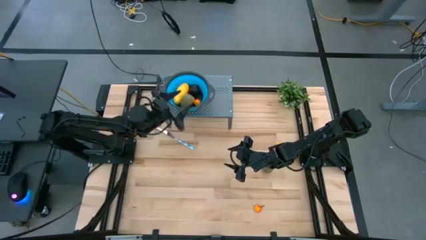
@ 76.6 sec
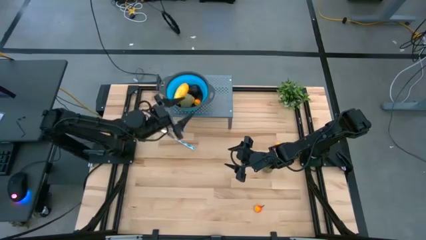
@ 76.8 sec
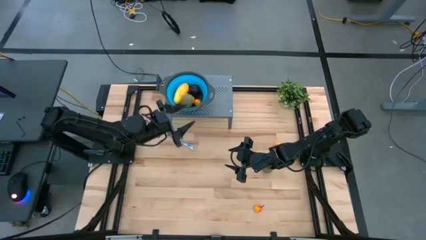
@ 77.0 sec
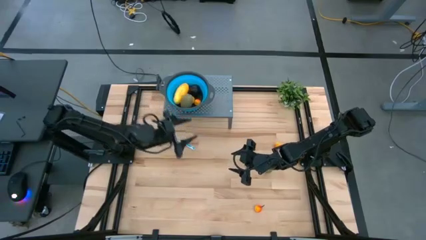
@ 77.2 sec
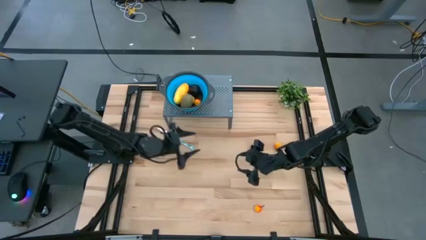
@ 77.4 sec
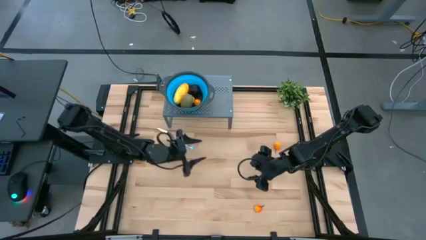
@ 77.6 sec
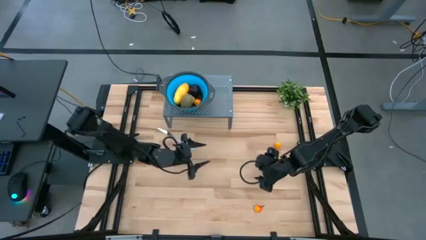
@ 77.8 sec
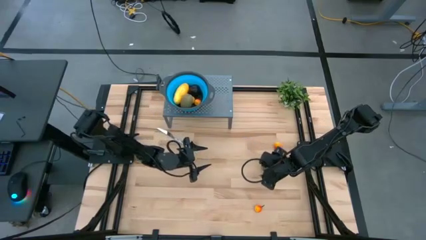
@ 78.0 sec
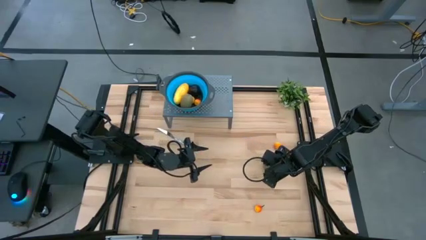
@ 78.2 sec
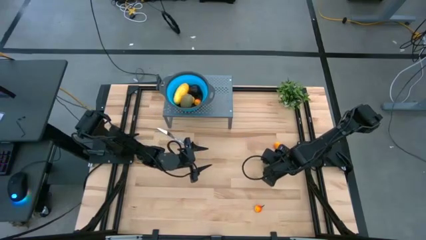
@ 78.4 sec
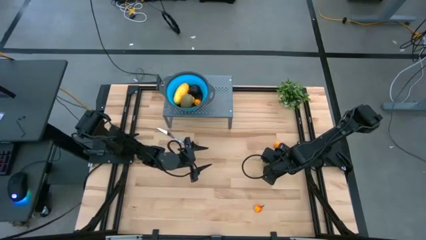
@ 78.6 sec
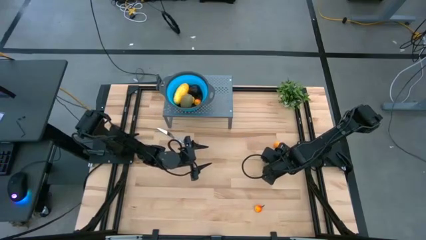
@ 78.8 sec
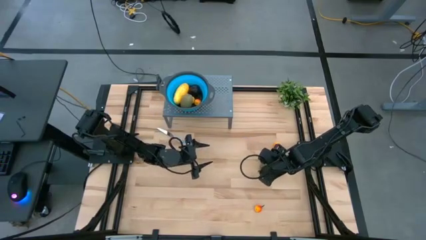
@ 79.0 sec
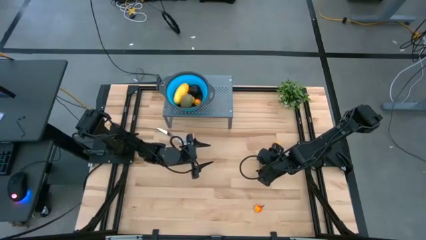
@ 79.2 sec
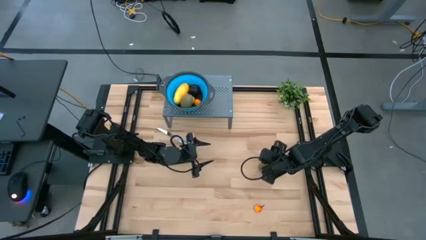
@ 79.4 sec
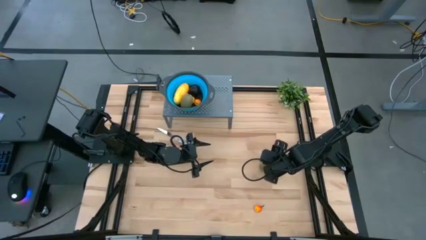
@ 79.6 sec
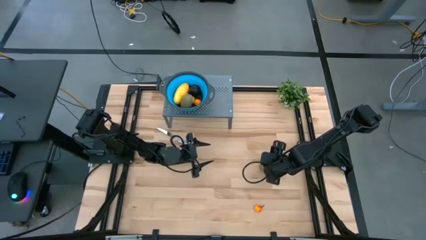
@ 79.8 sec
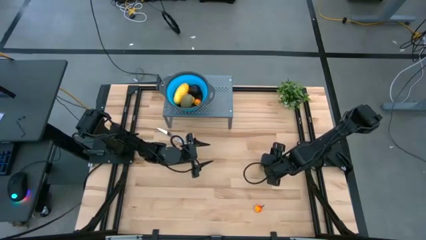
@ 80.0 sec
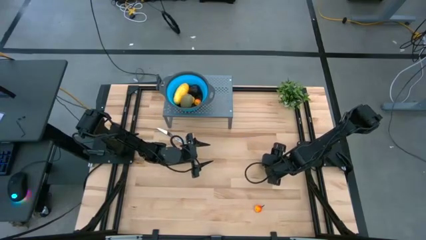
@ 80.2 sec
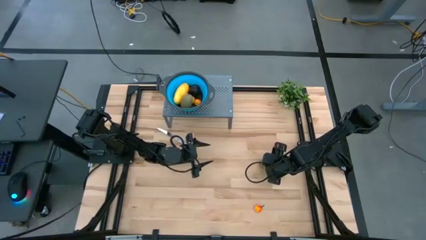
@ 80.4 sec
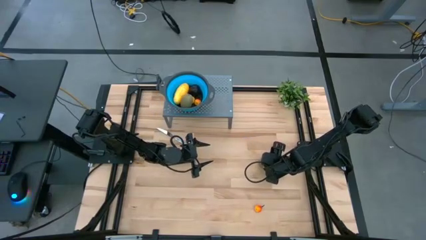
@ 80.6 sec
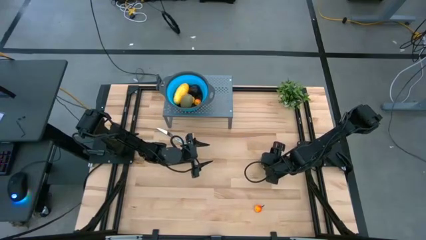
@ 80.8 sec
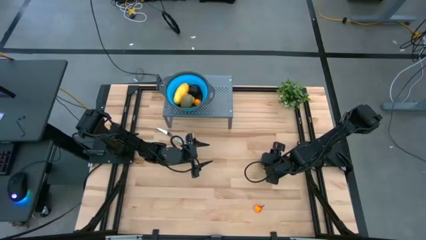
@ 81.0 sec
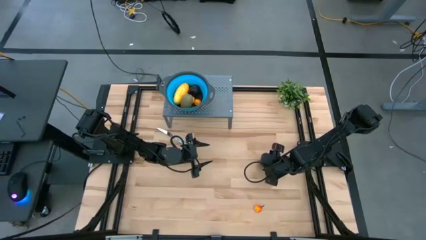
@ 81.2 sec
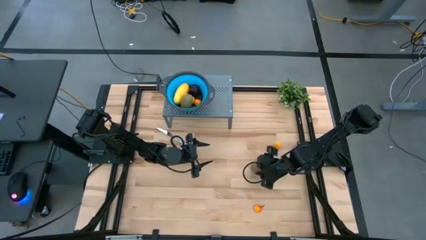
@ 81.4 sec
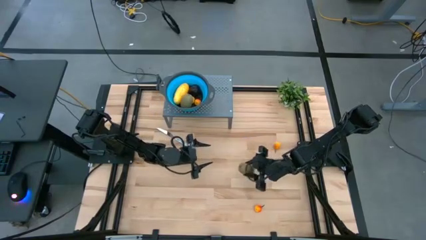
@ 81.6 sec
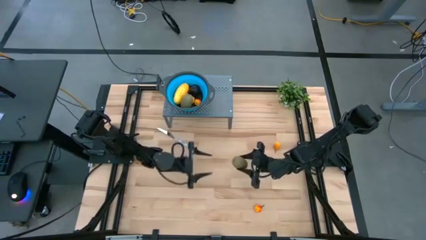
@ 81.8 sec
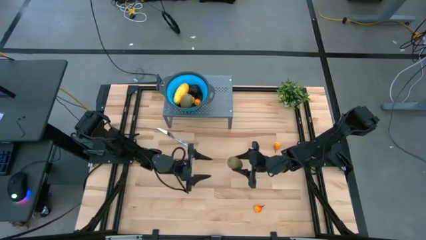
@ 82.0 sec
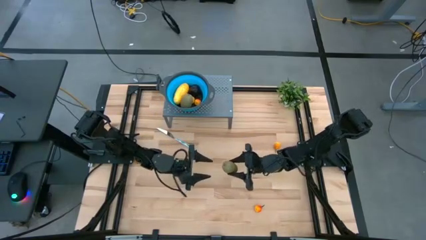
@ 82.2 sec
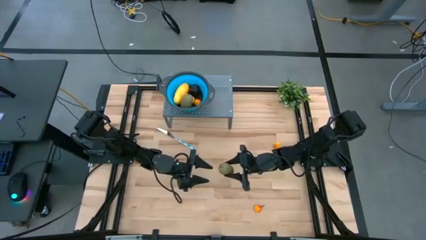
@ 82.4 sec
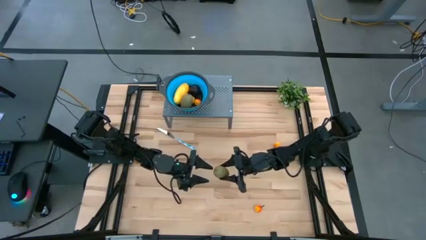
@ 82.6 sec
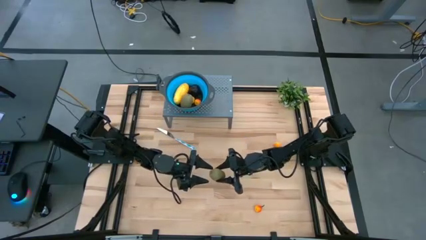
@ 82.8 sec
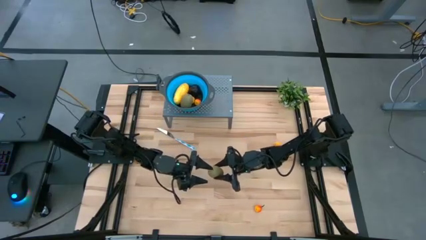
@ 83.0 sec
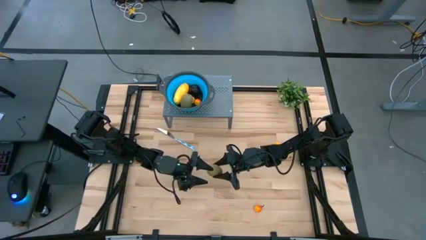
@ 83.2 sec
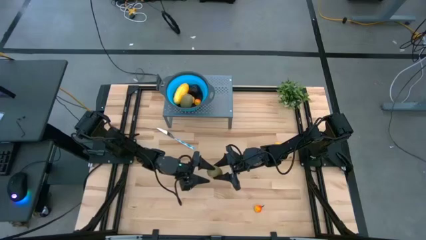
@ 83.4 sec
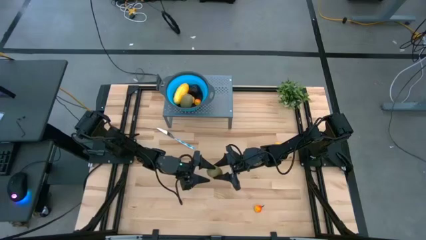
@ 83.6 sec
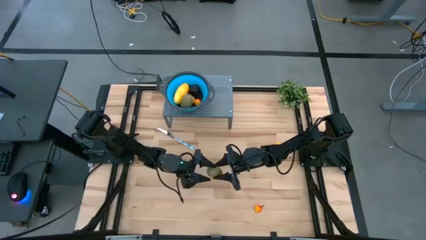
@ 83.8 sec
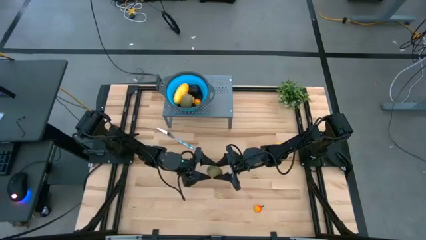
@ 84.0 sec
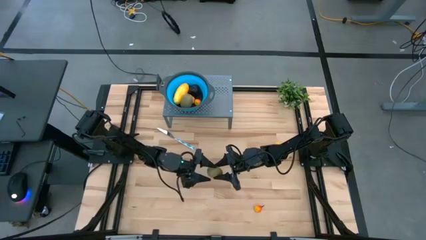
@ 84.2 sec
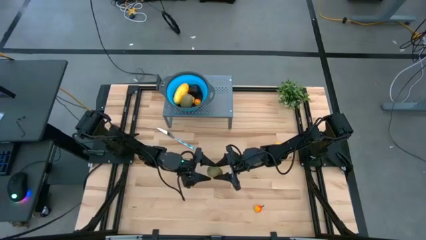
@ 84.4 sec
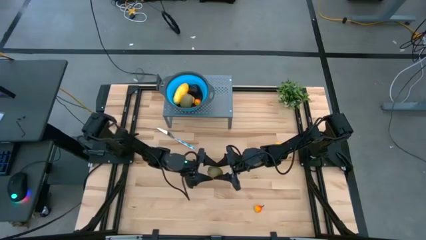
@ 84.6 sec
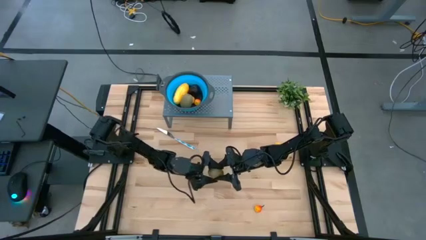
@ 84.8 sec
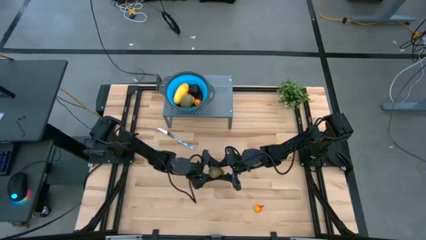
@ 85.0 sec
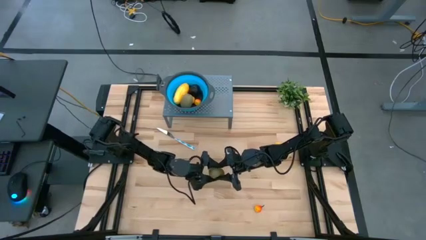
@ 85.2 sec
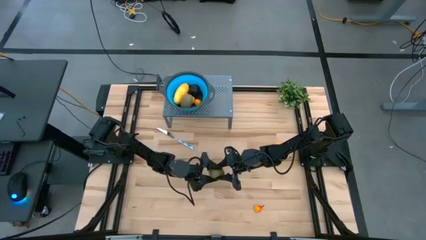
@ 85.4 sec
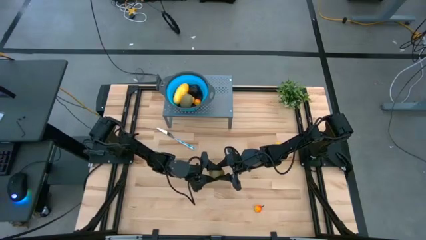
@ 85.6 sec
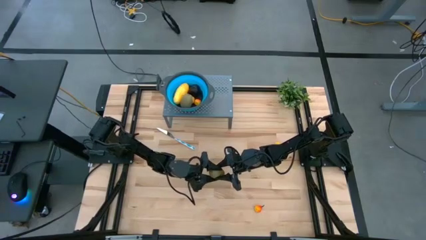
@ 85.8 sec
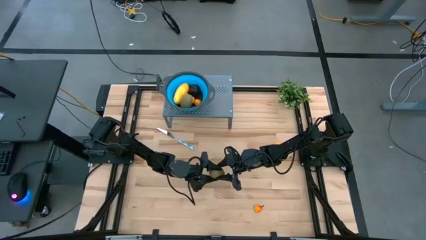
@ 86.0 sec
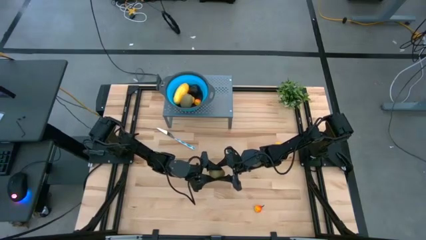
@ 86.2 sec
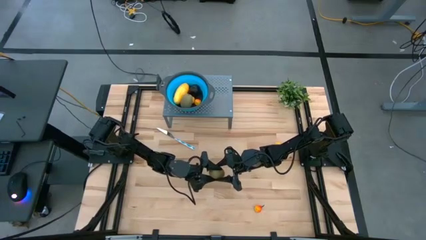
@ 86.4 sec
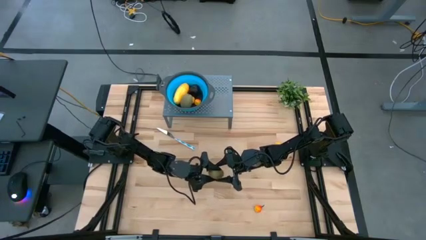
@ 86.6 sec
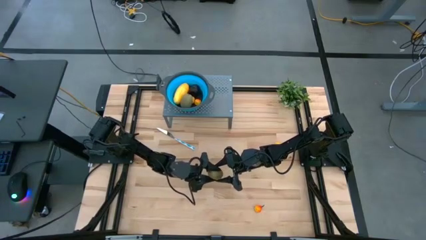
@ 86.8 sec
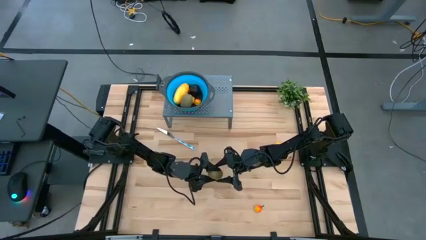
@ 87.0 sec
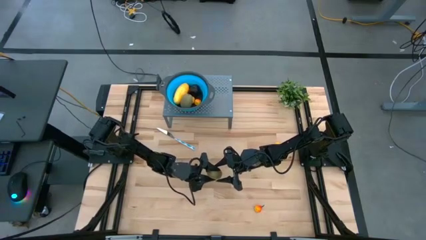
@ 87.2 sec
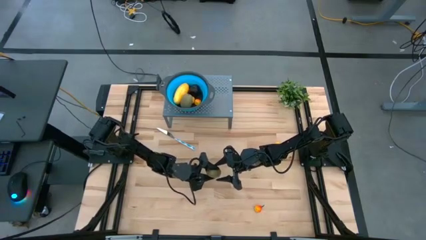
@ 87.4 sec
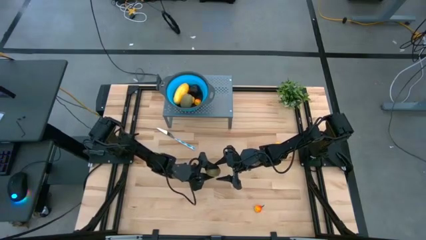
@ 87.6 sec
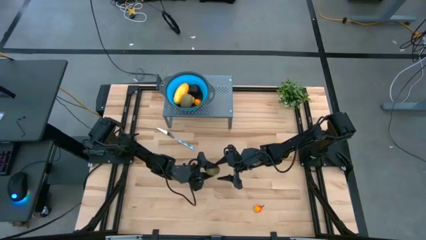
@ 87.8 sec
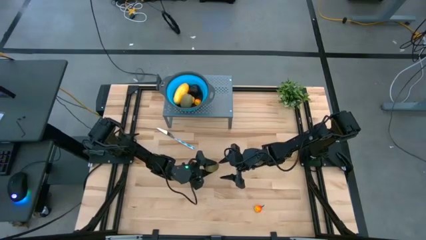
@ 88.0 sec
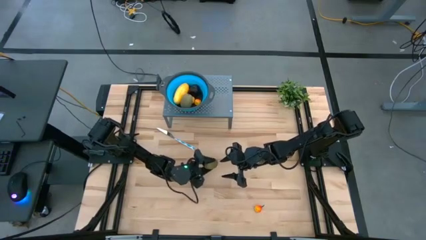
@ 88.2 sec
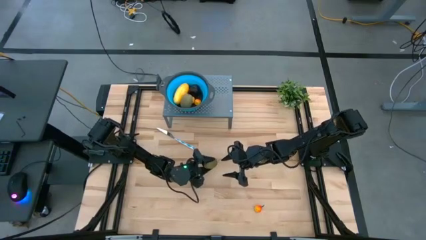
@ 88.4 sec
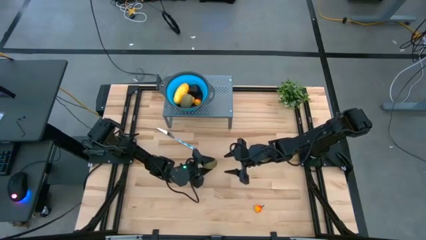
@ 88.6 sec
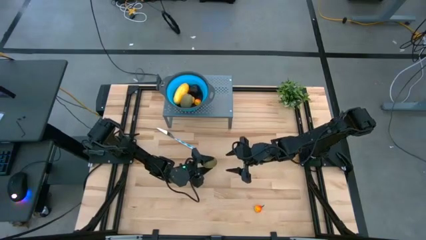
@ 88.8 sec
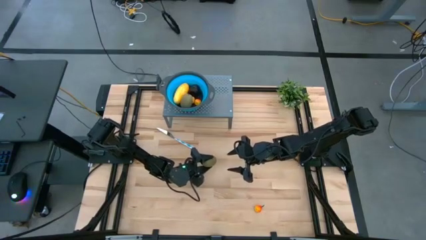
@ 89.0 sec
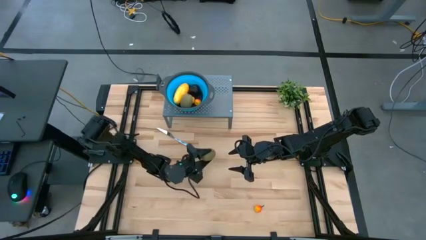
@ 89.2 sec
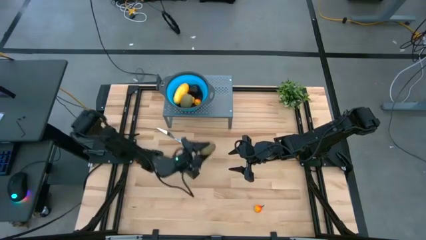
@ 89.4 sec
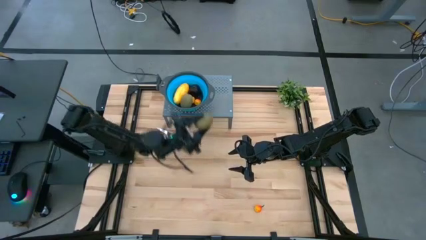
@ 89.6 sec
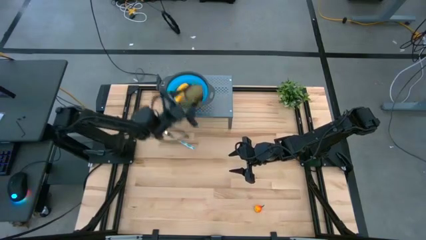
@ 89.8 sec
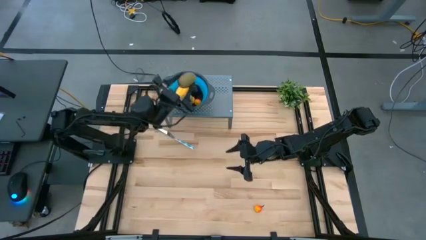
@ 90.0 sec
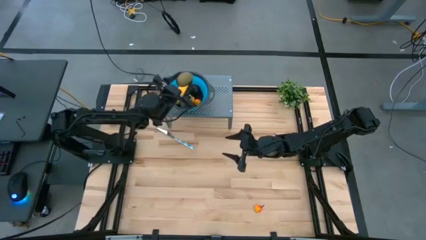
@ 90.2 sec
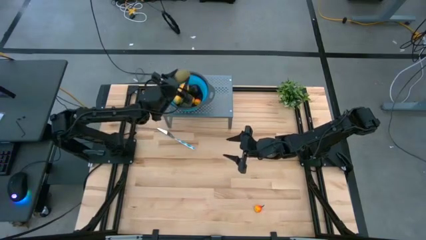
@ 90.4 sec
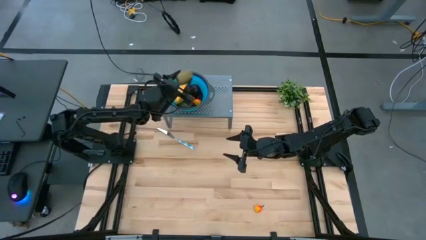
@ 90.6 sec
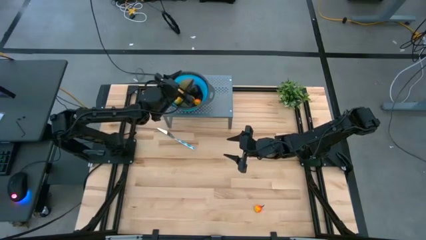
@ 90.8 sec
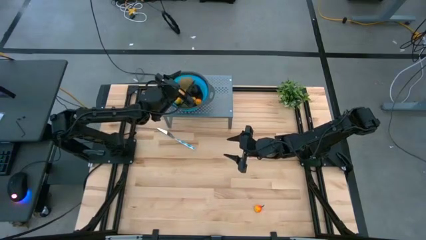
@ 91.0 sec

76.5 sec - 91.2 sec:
Task: Pick & Place Fruit
Put the green kiwi into the blue strainer bowl
